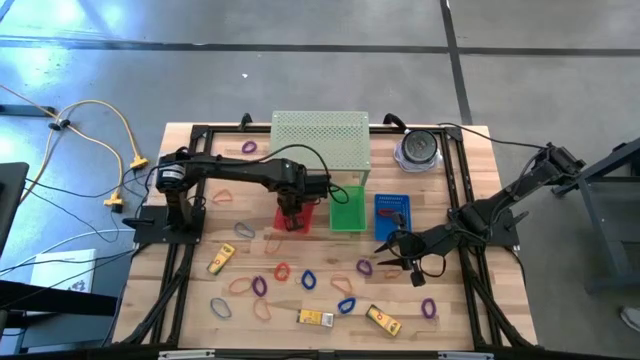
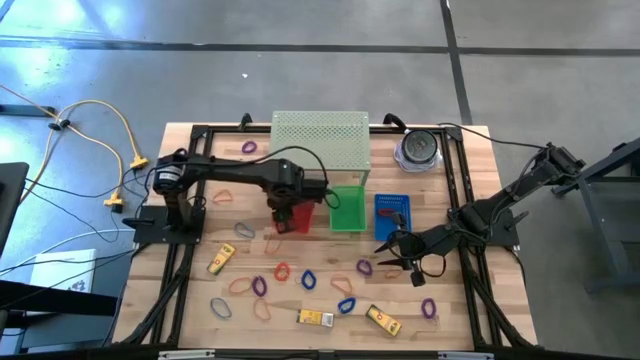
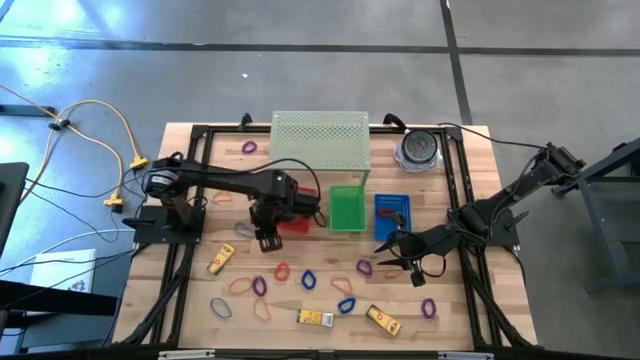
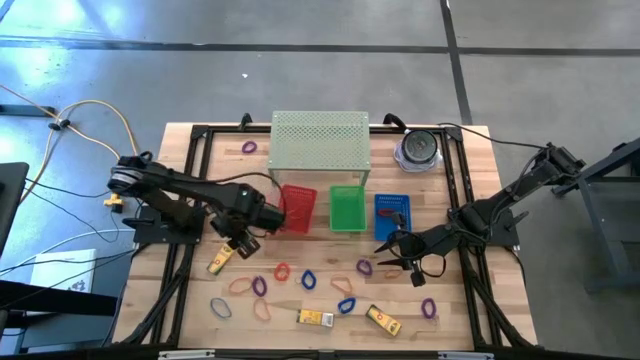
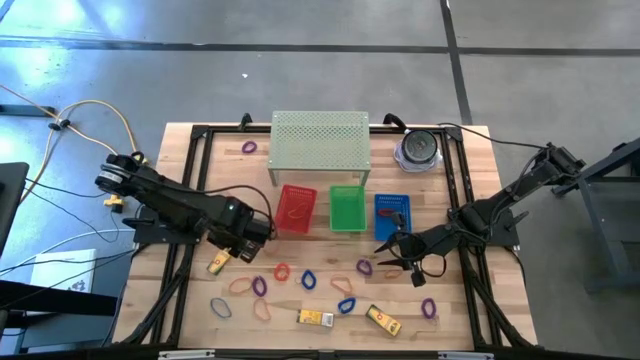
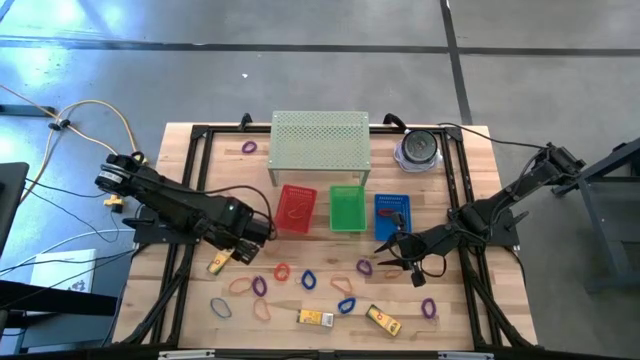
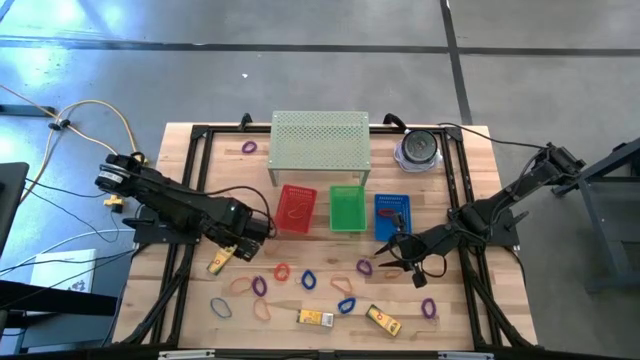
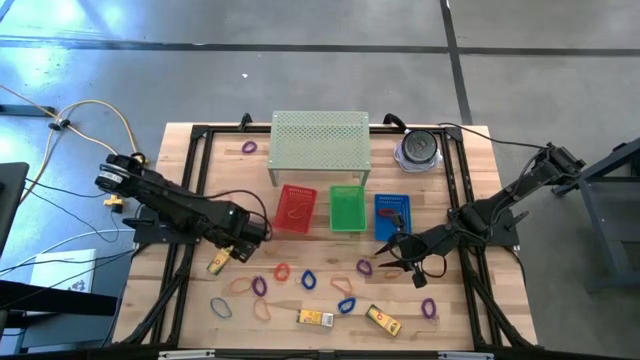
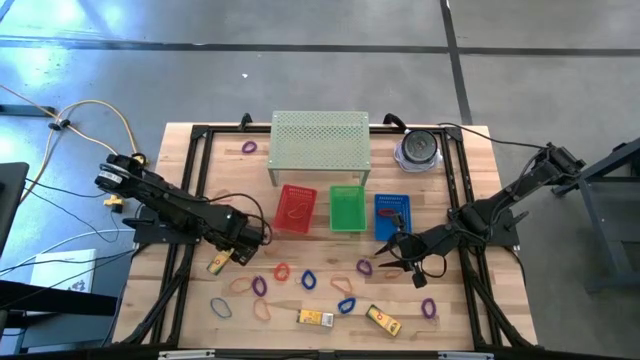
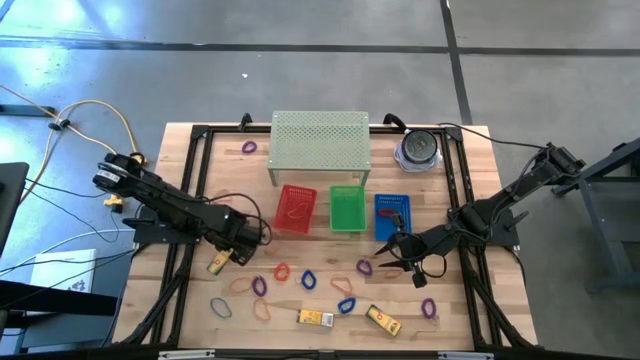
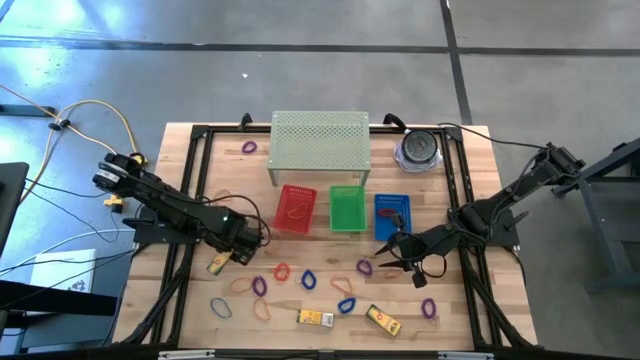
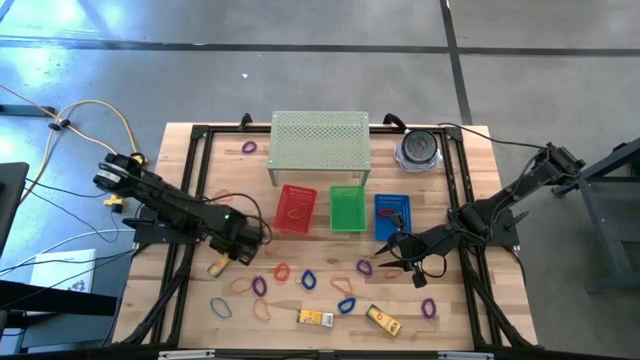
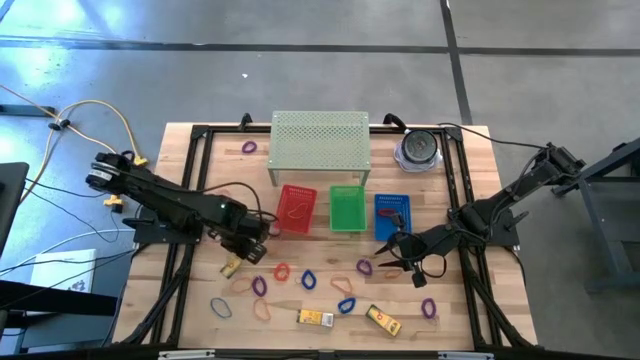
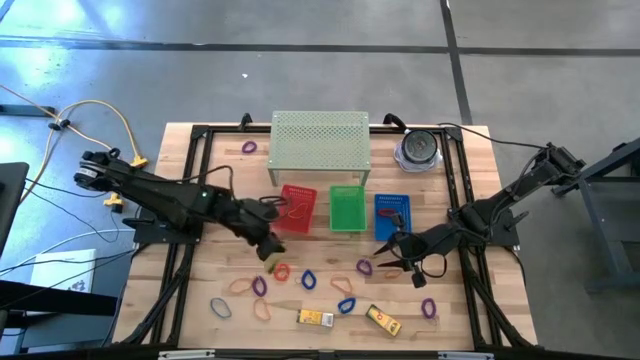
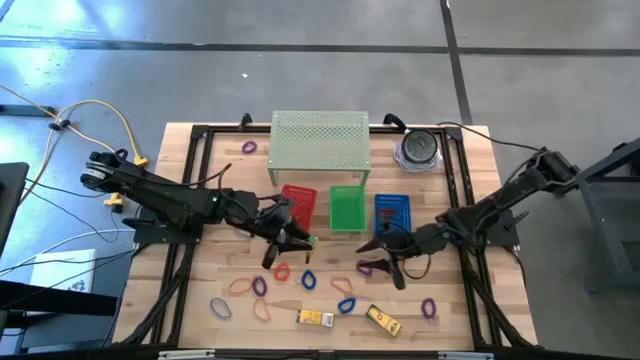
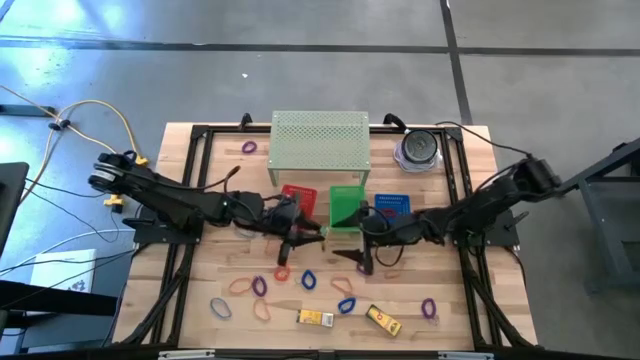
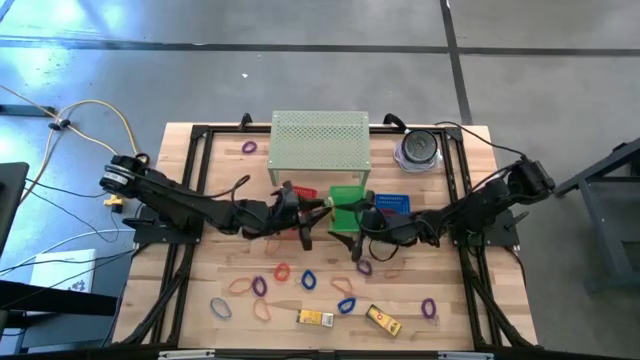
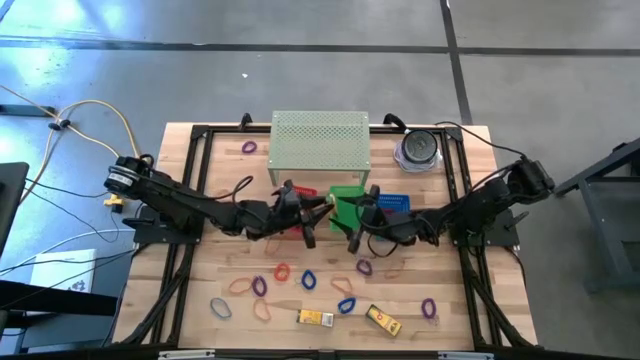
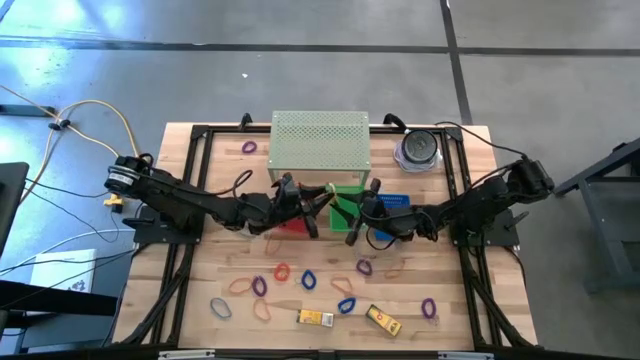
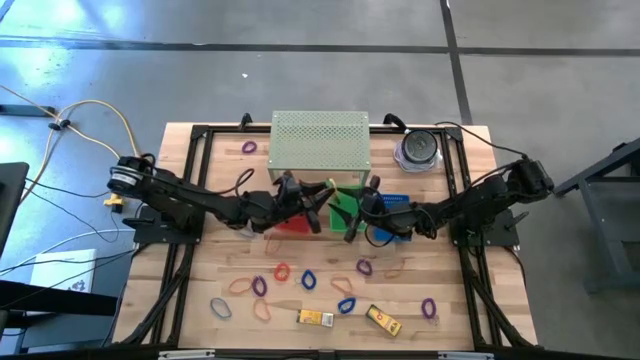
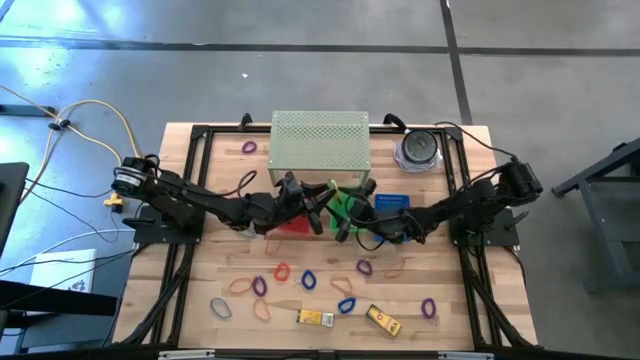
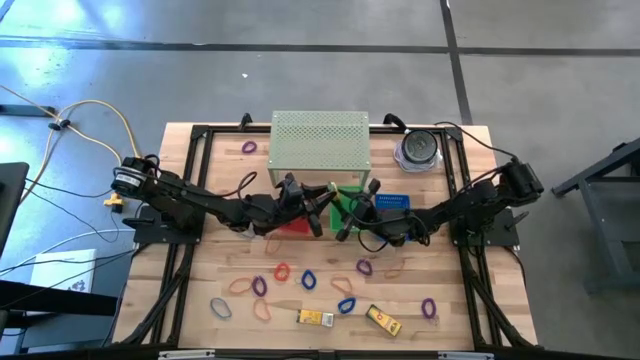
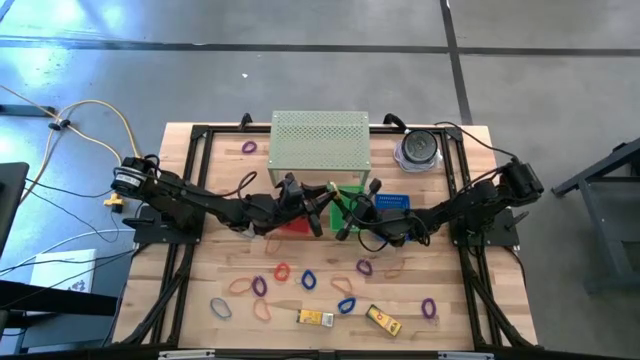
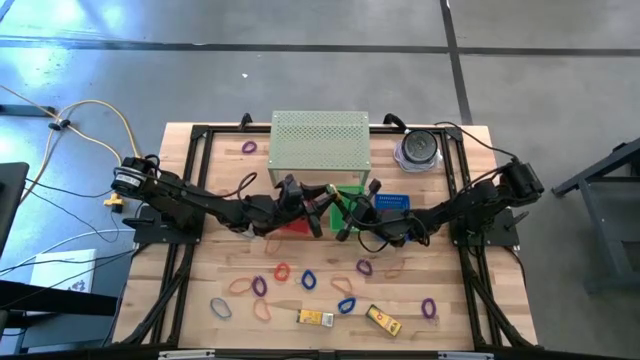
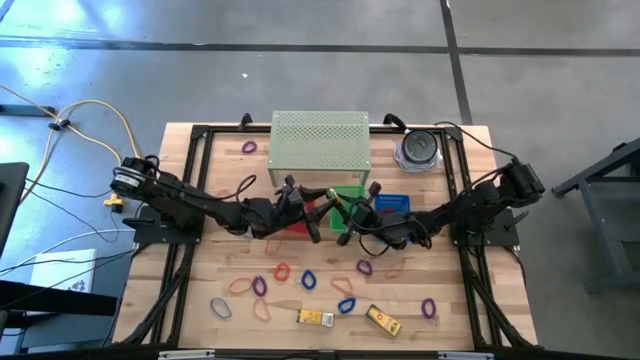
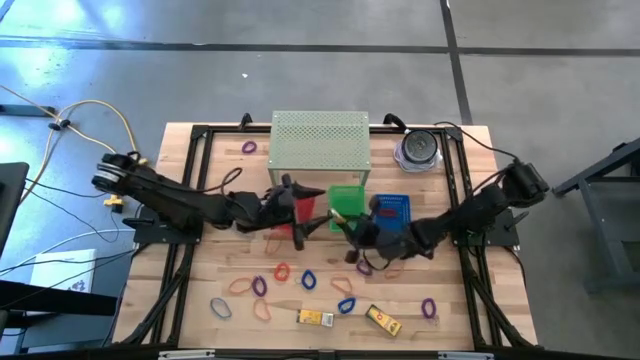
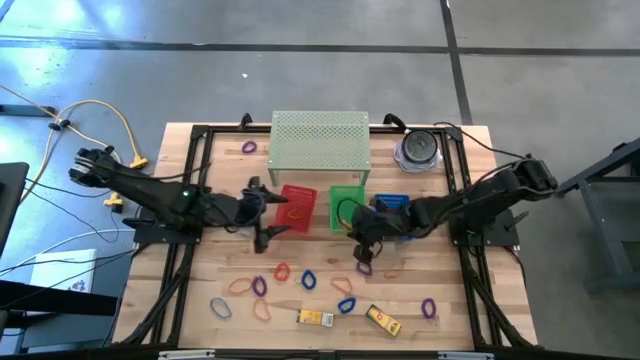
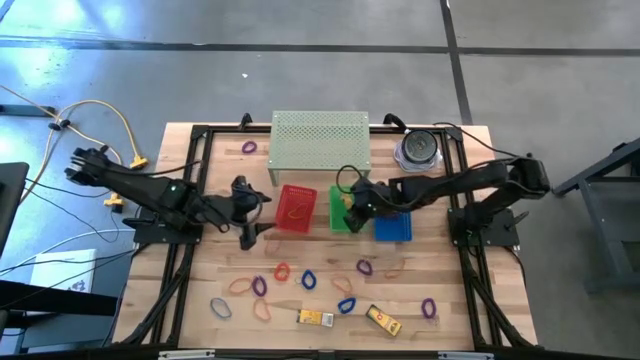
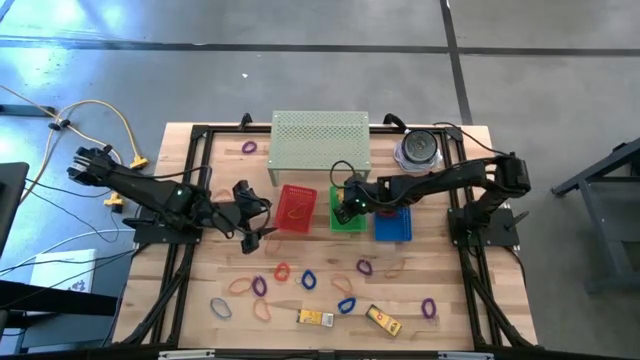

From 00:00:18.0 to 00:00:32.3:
Task: Pick & Place Office Desk Supplies
Put the left yellow crayon box into the green bin

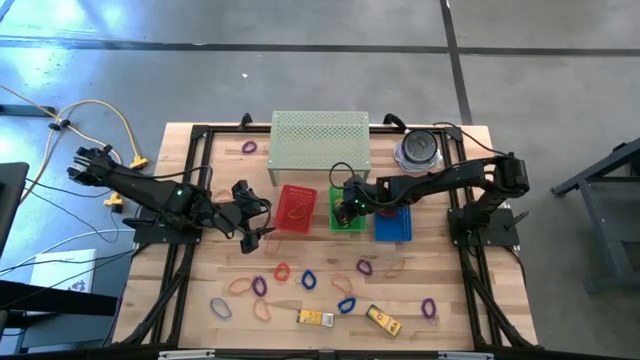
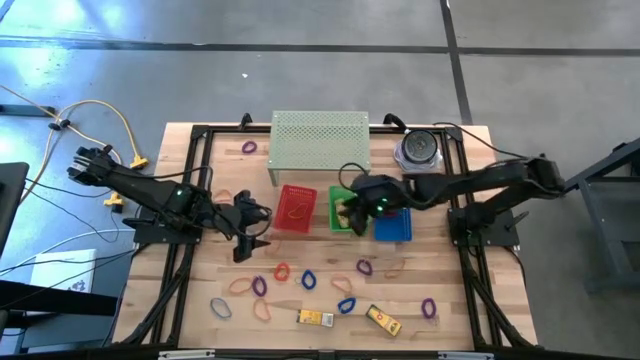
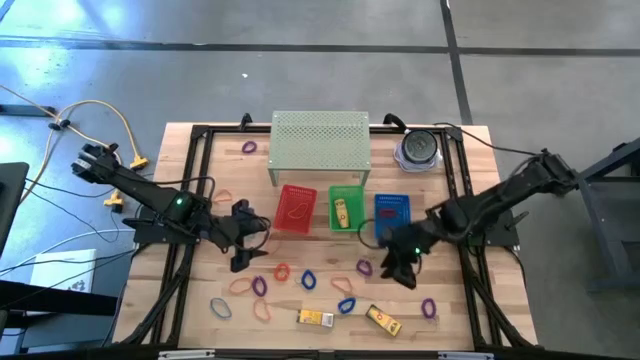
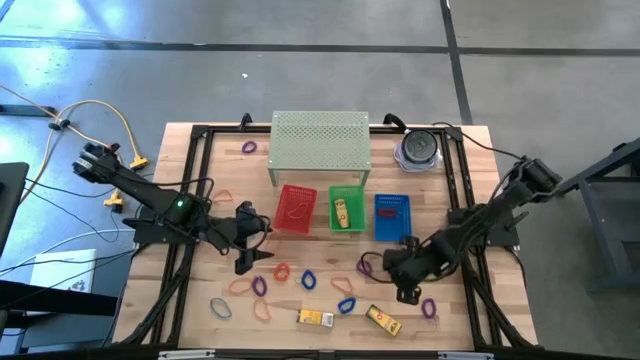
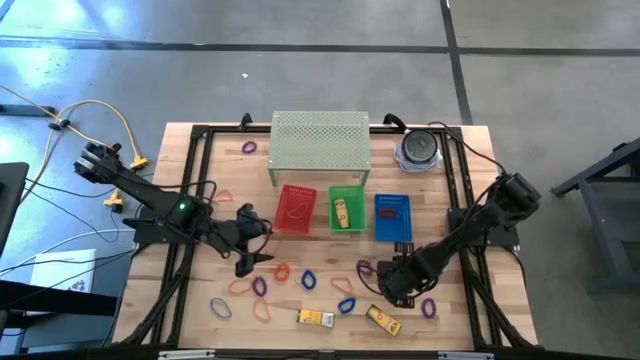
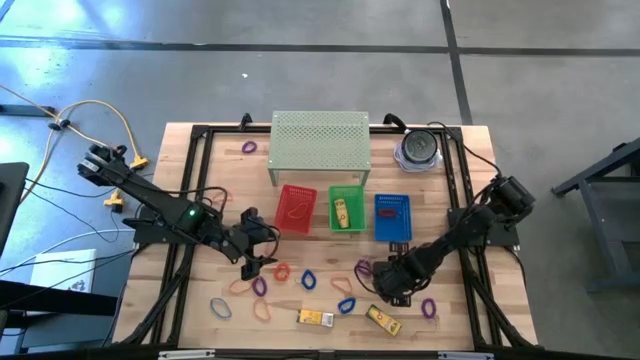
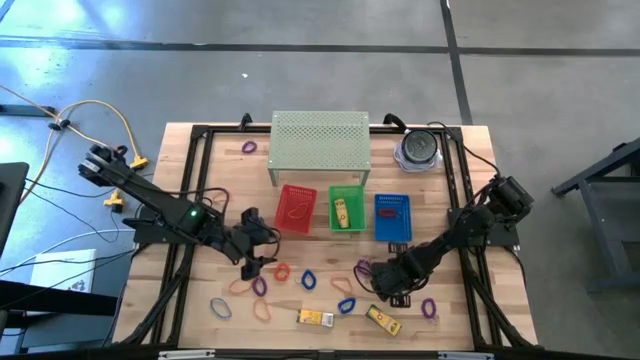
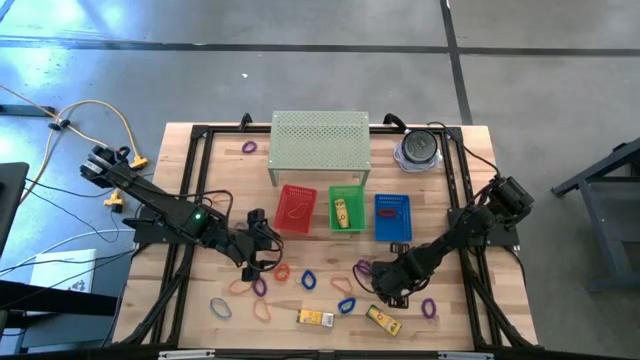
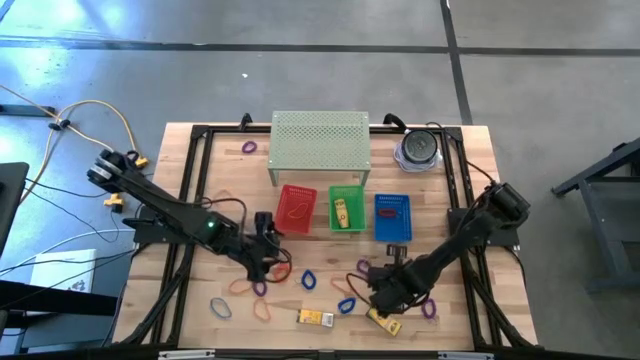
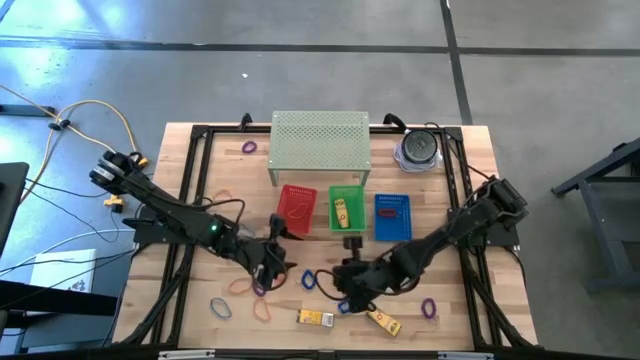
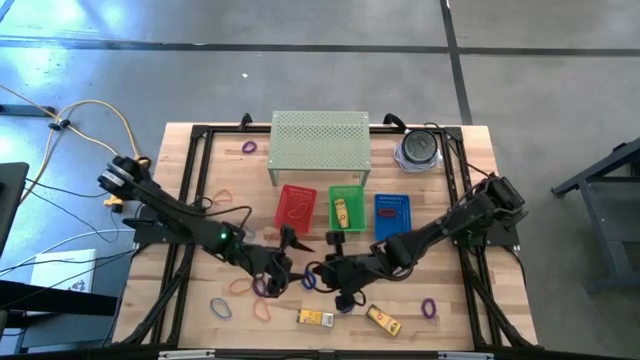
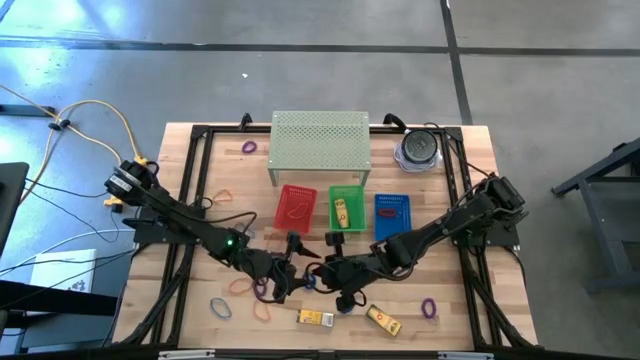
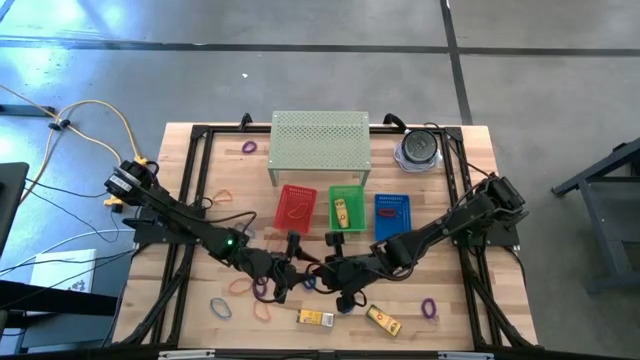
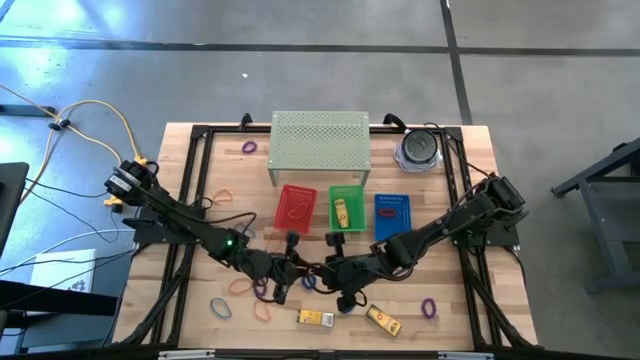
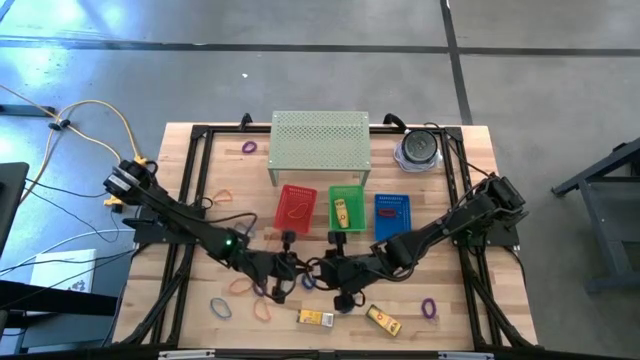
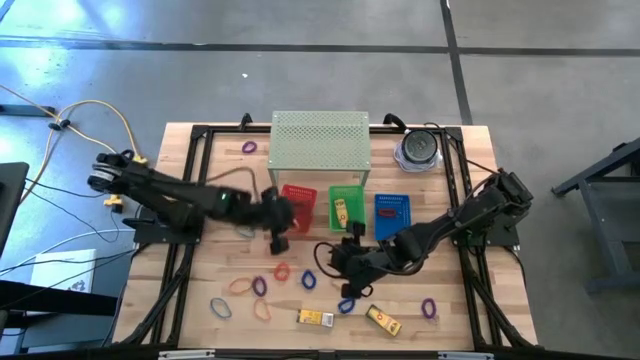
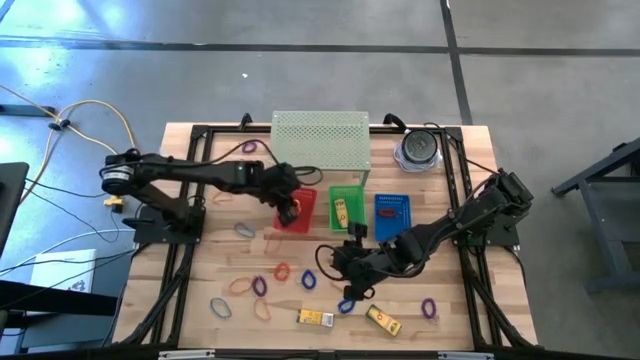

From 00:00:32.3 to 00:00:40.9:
Put the orange rubber band into the red bin
